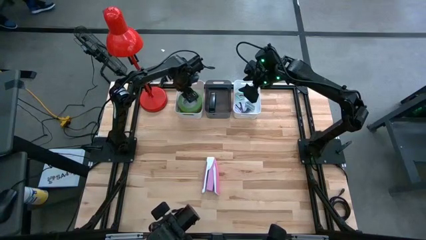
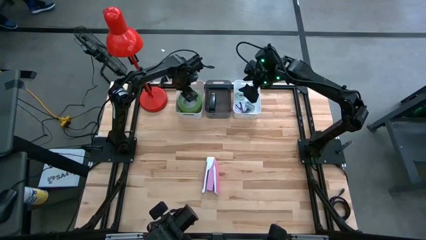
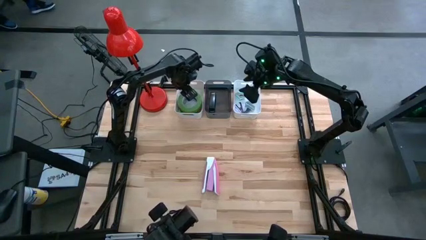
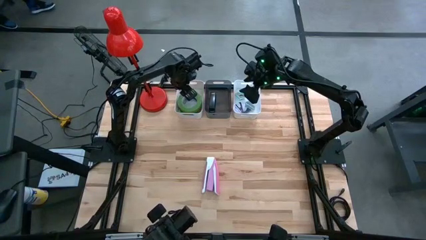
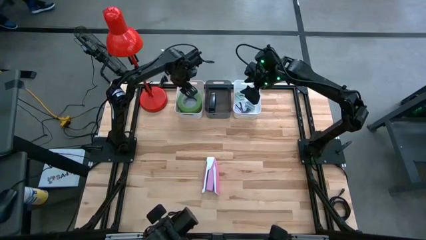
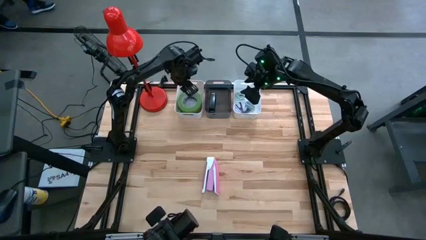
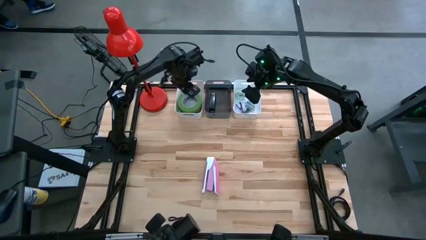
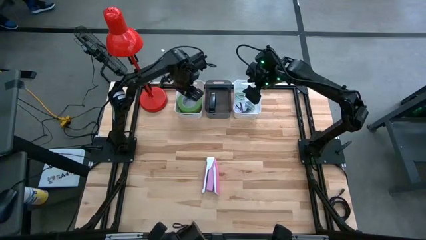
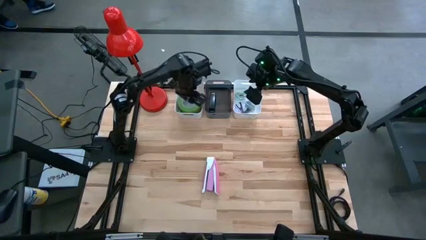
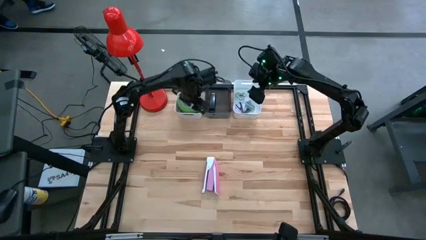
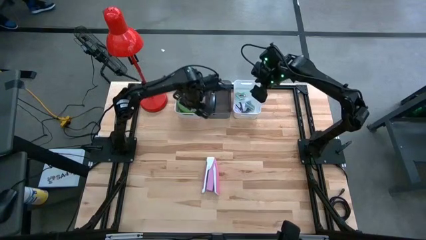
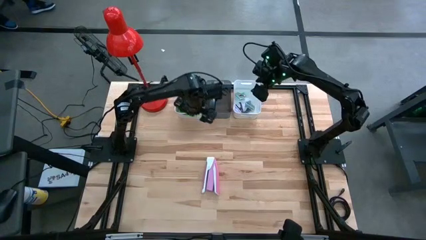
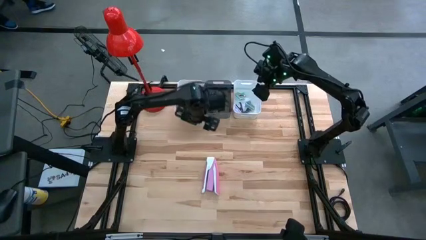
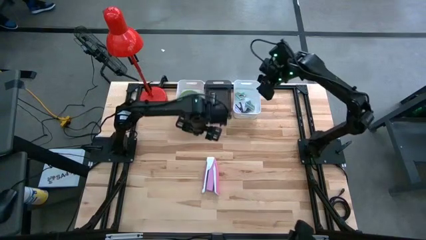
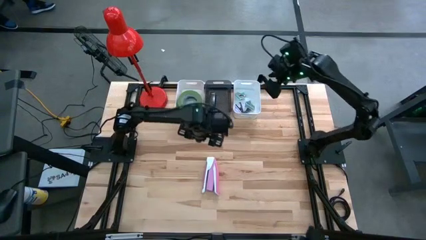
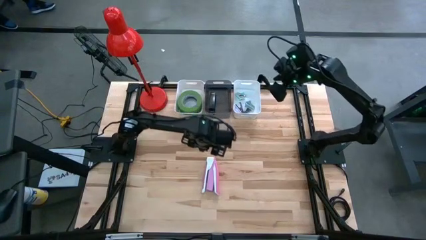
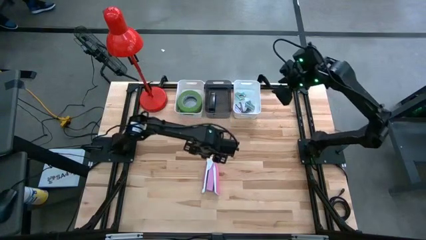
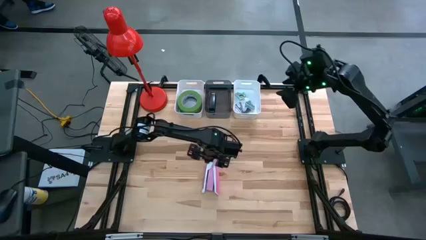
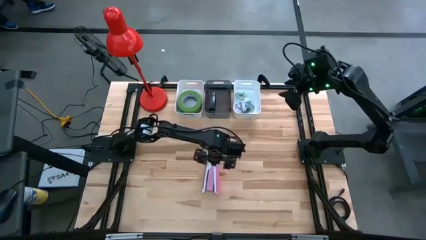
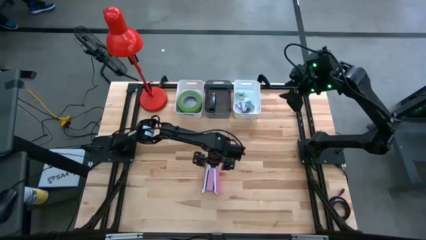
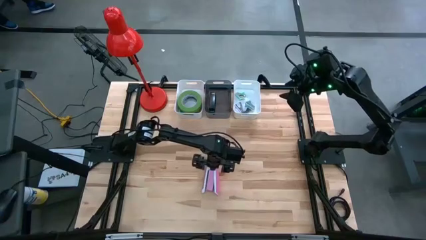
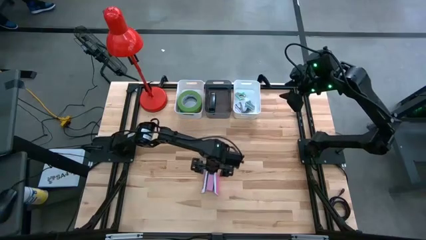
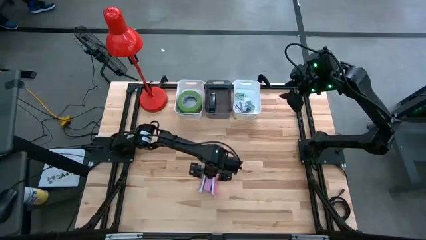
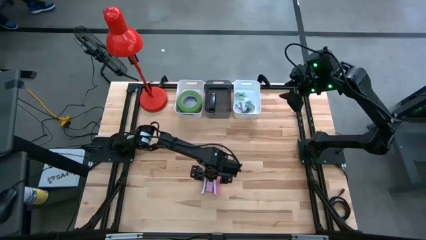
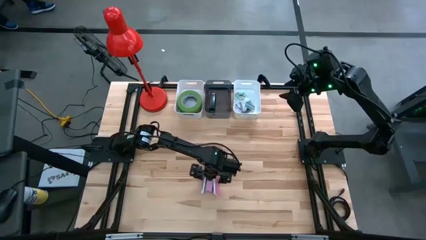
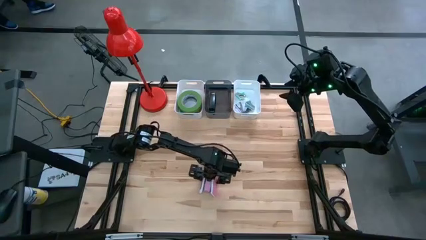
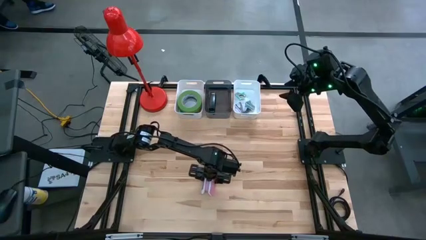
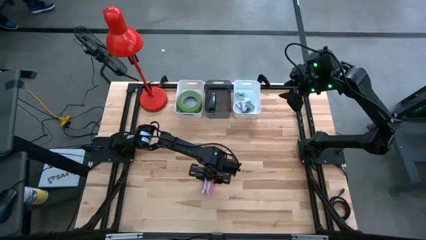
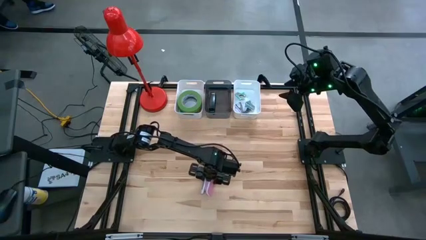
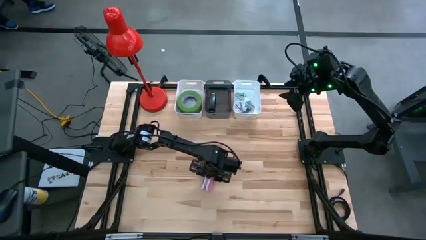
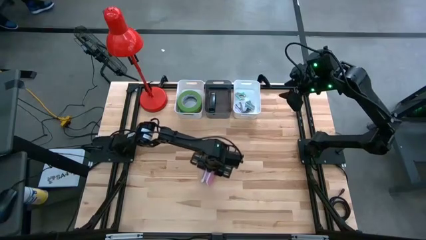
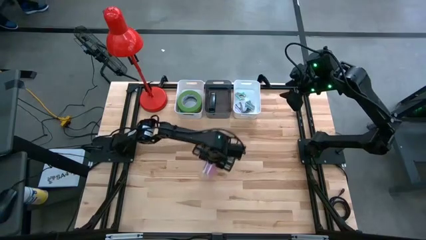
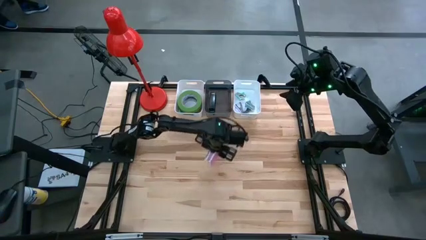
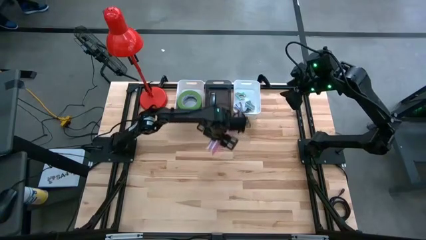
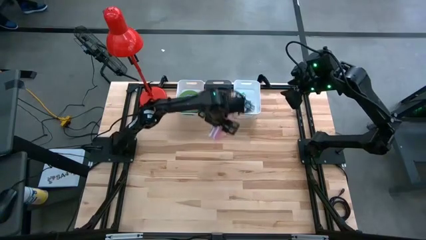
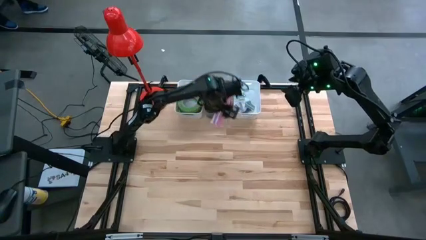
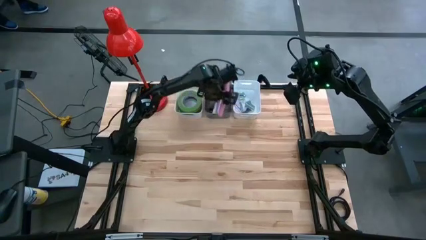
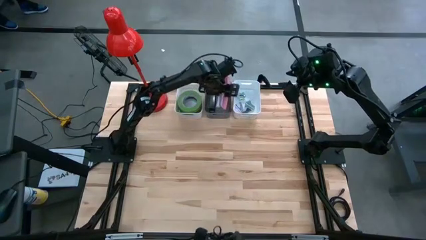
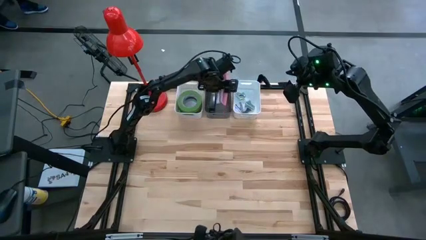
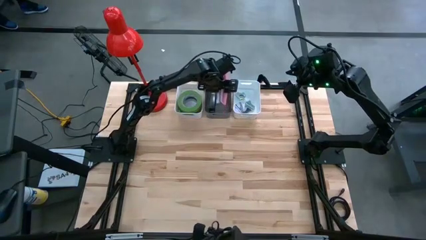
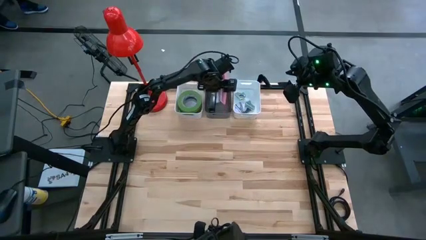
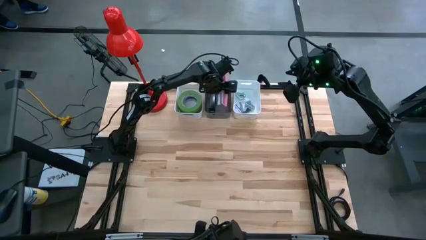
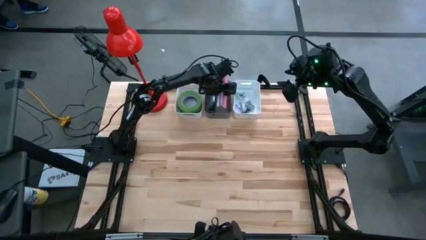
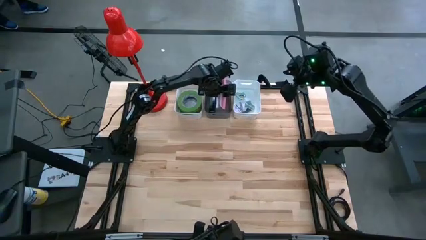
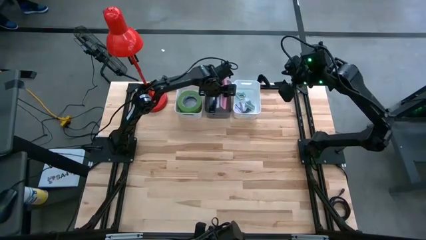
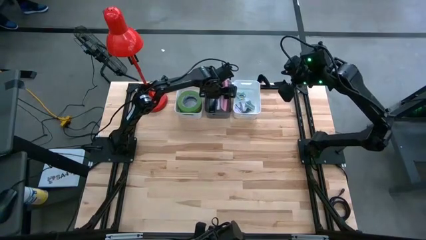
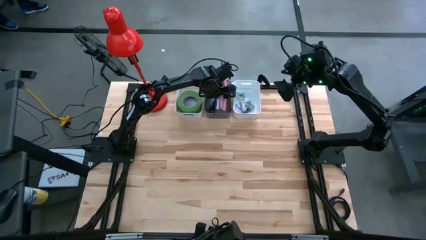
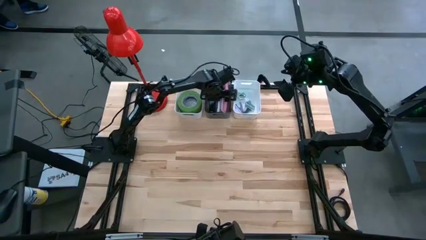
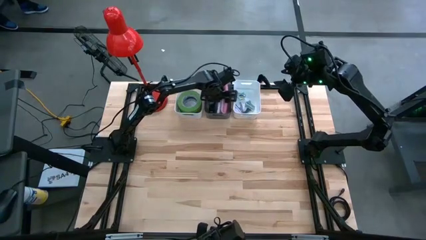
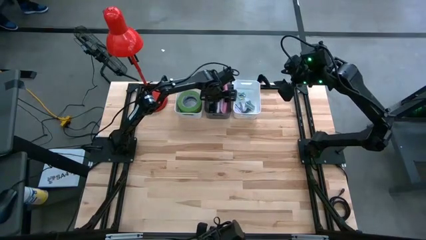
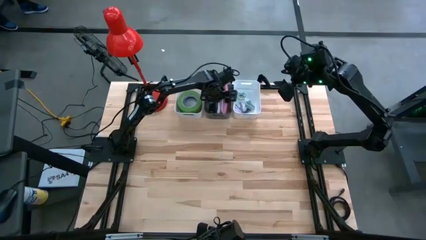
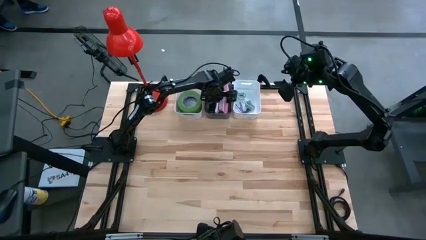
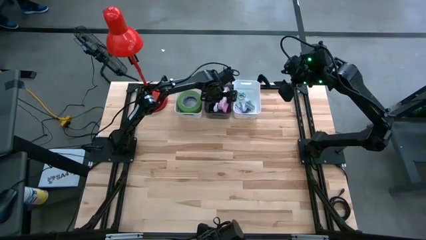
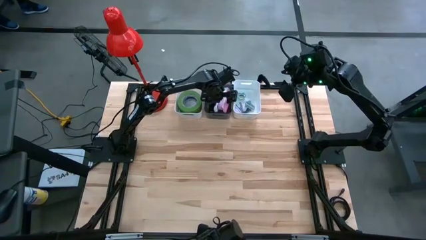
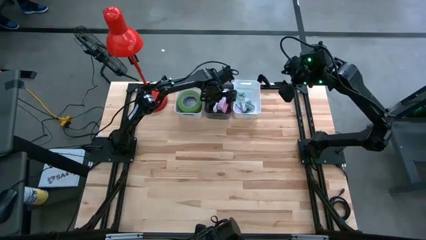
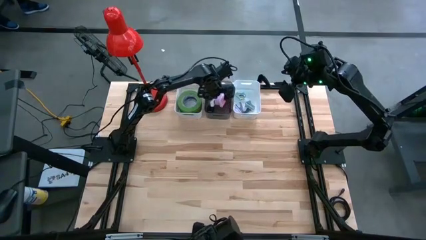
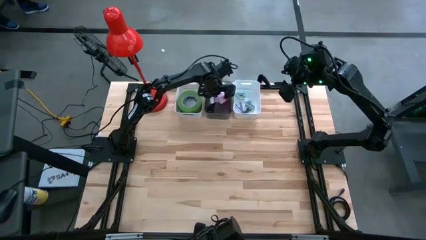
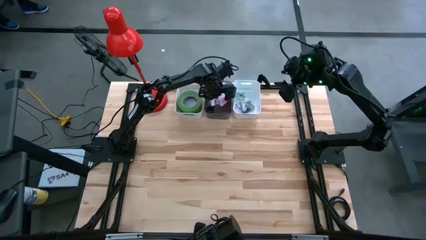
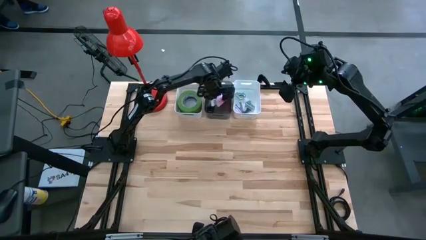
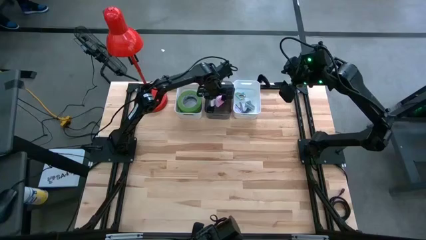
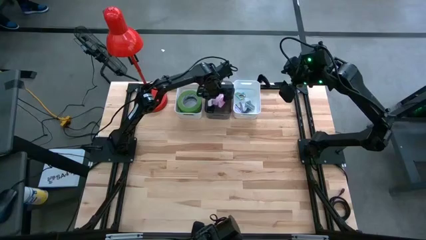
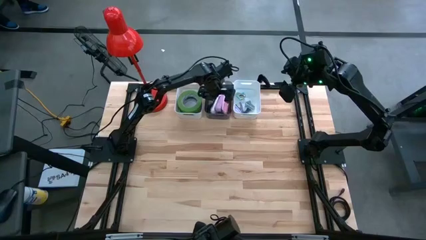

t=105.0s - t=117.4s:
Task: Pick and place Stapler, Stapler remover, tape
Put the pink stapler into the black bin

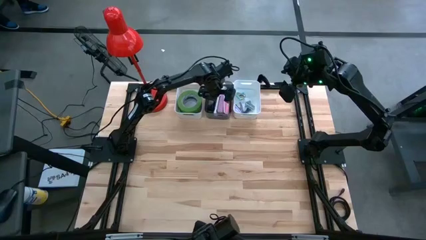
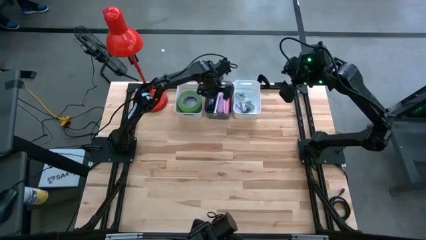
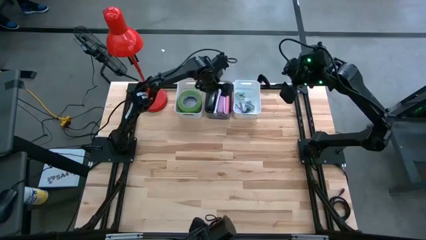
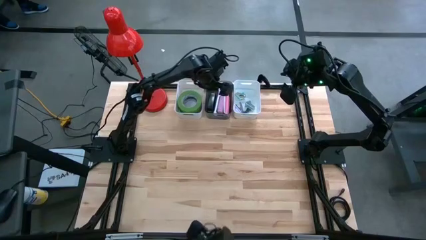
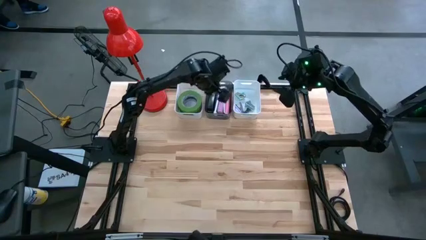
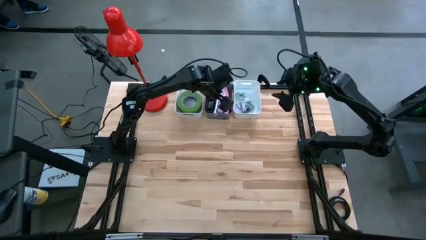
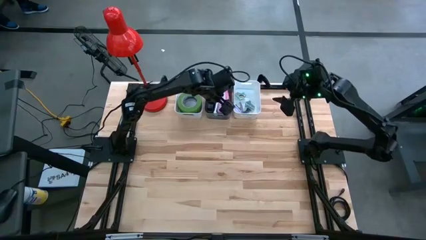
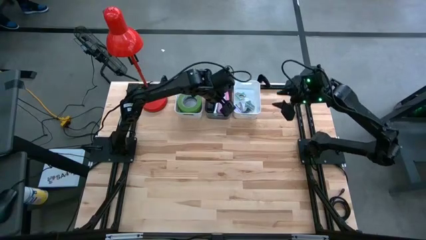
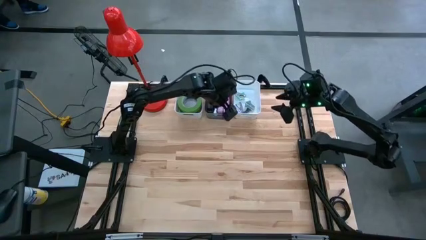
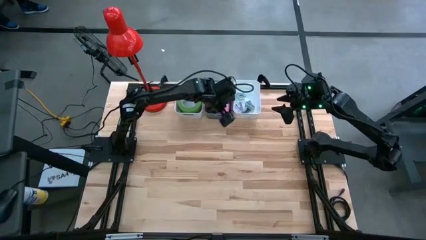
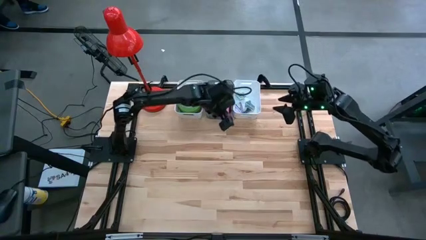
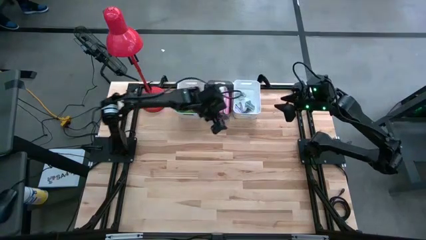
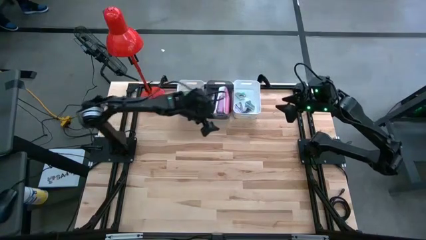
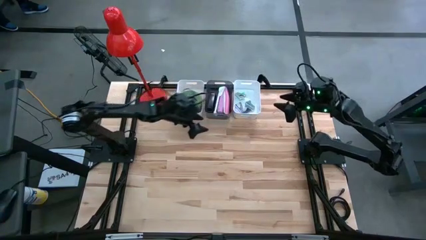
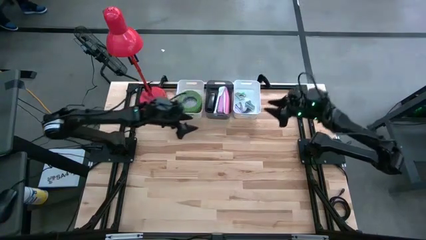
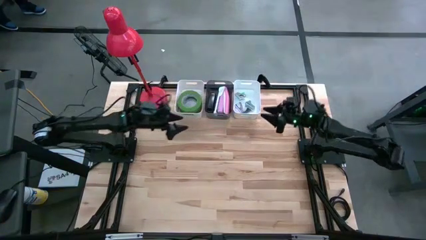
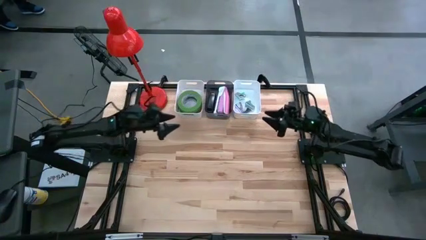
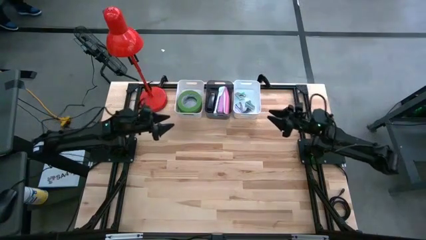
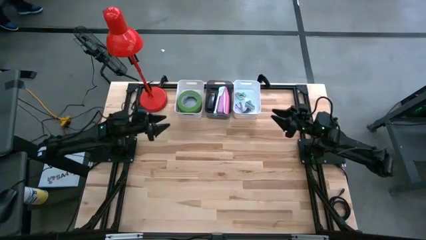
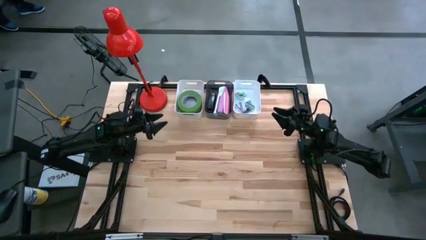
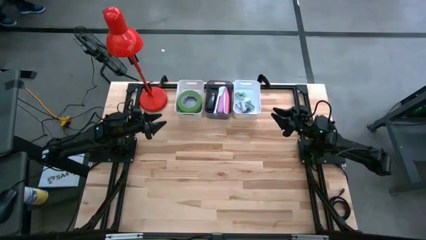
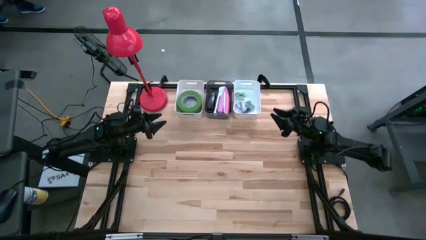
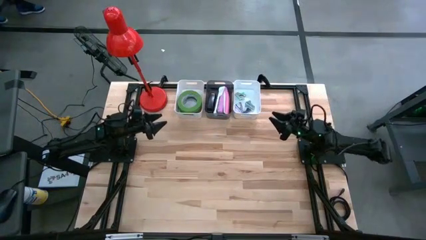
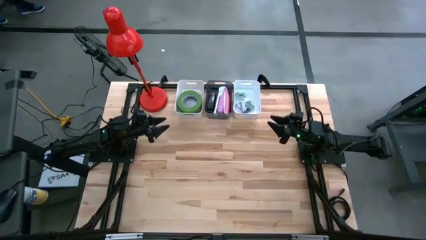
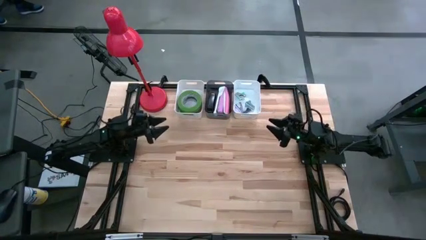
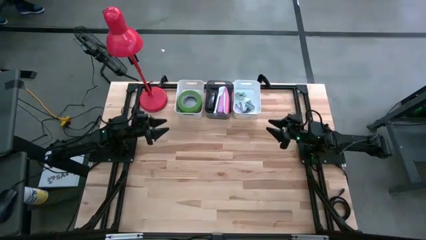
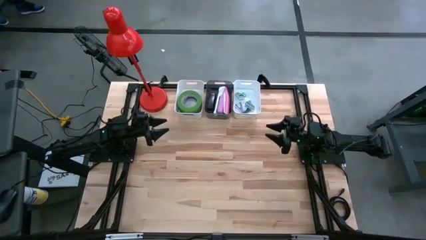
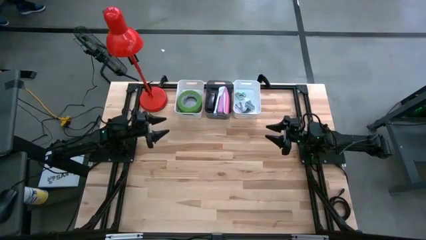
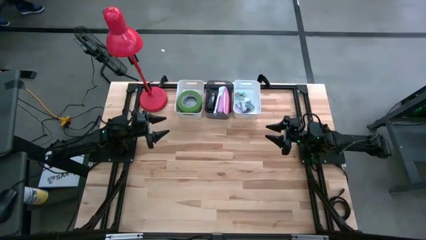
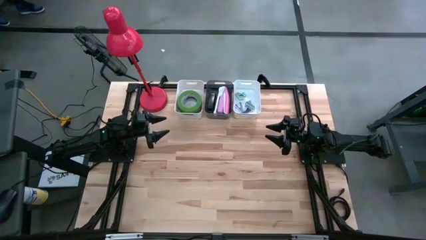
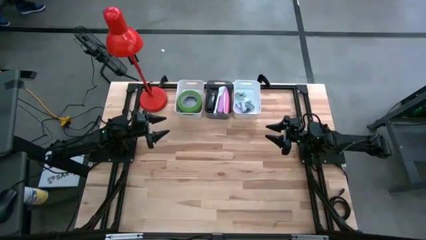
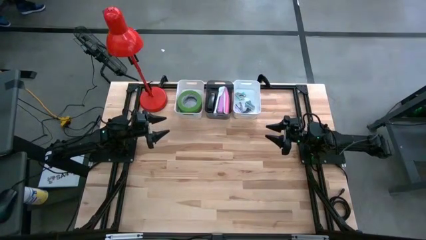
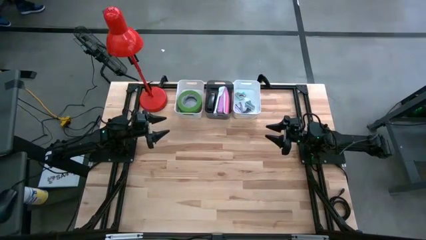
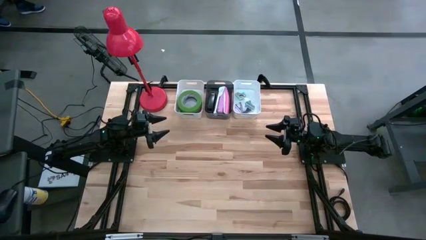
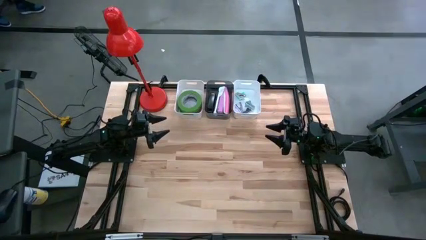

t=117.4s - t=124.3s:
Return to Home Position
